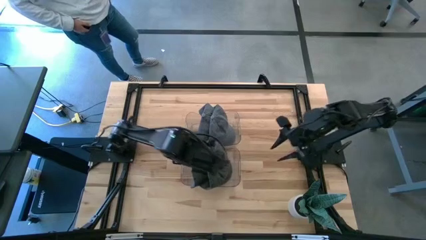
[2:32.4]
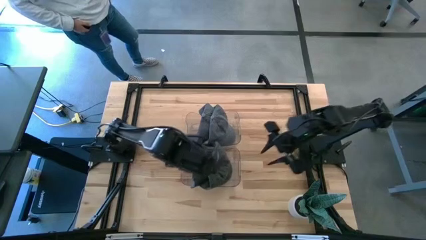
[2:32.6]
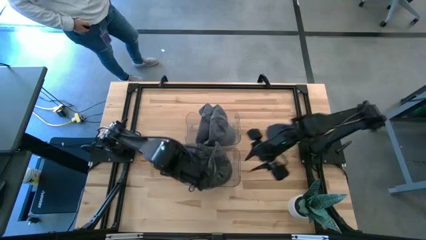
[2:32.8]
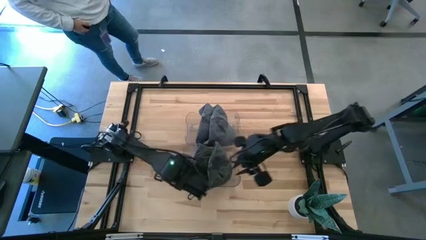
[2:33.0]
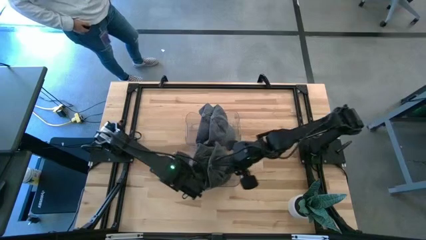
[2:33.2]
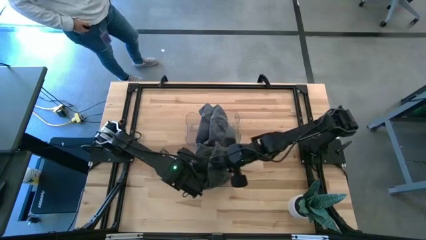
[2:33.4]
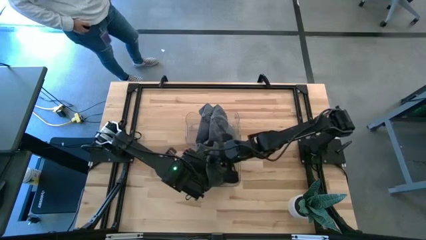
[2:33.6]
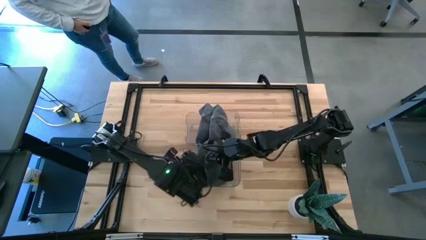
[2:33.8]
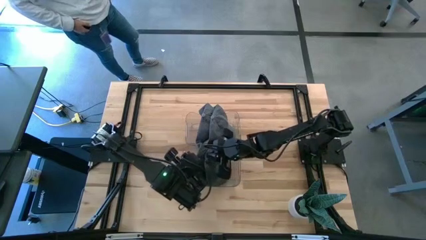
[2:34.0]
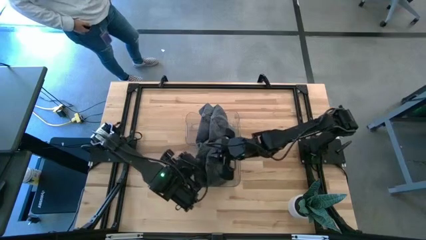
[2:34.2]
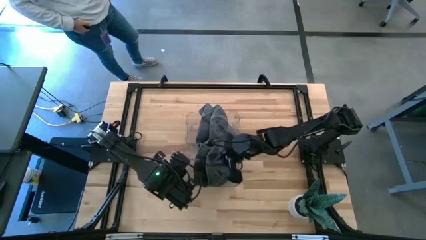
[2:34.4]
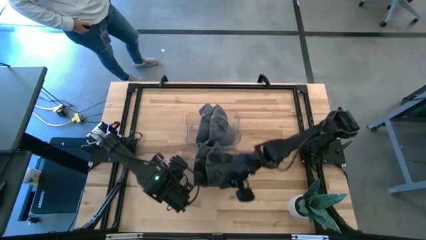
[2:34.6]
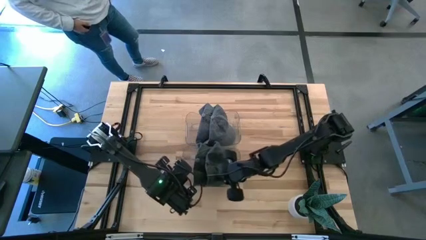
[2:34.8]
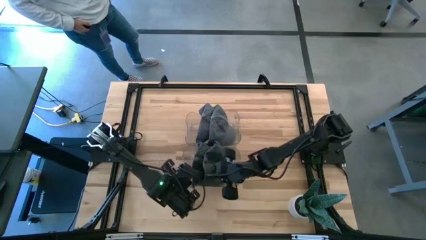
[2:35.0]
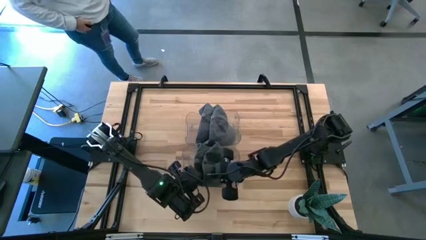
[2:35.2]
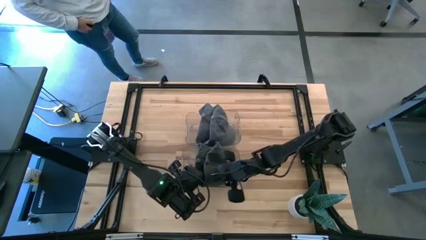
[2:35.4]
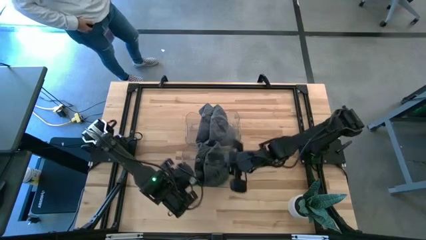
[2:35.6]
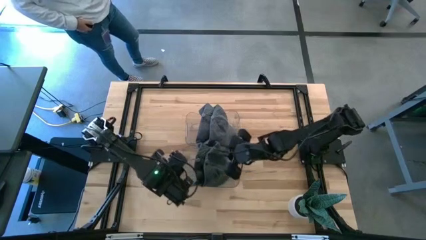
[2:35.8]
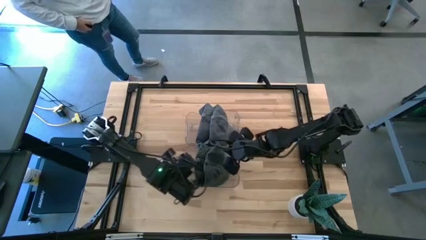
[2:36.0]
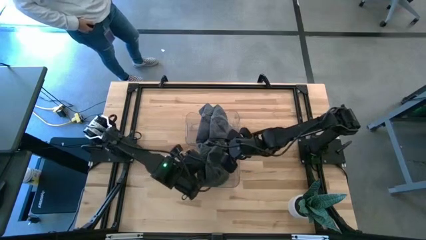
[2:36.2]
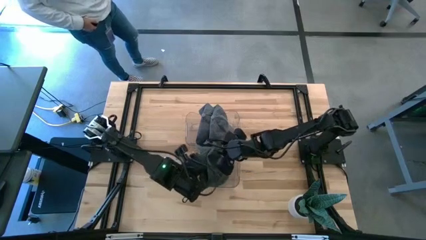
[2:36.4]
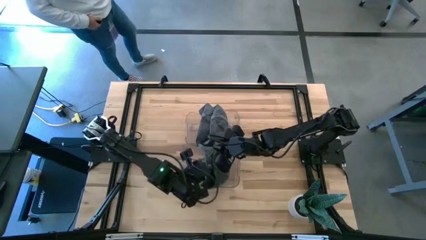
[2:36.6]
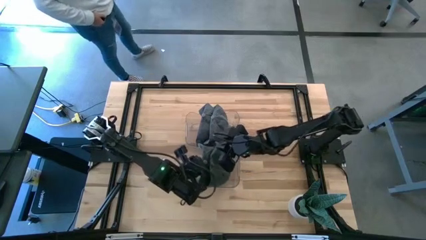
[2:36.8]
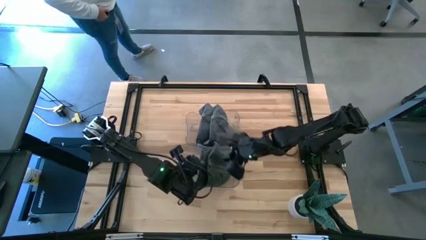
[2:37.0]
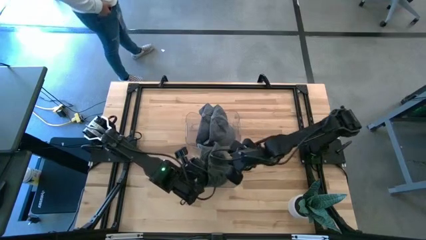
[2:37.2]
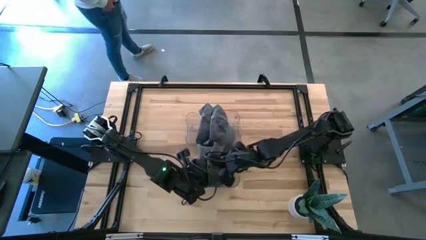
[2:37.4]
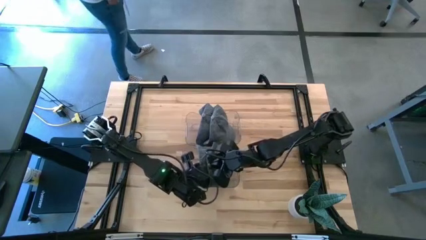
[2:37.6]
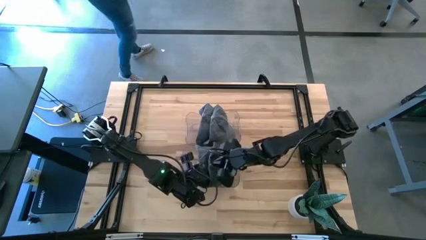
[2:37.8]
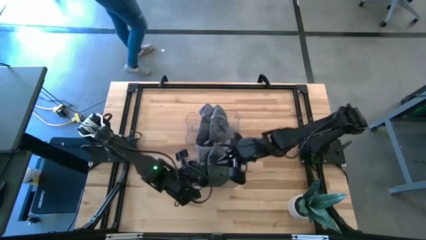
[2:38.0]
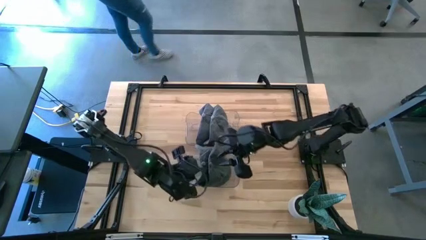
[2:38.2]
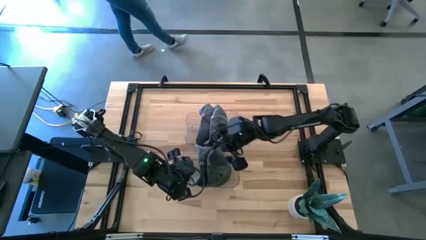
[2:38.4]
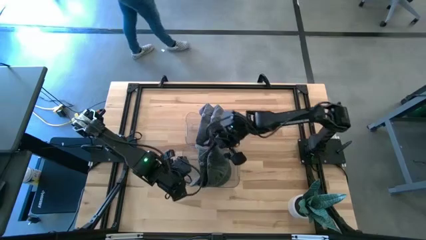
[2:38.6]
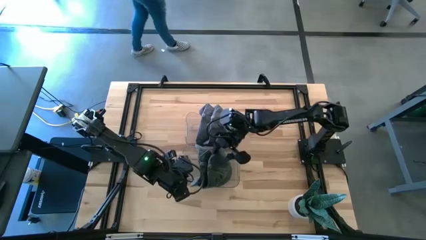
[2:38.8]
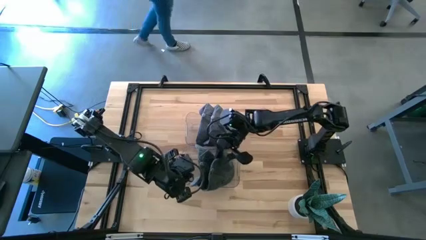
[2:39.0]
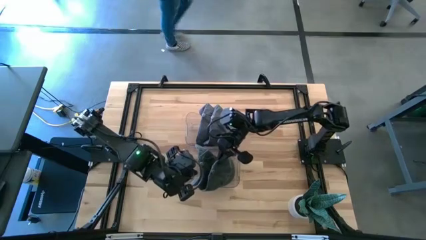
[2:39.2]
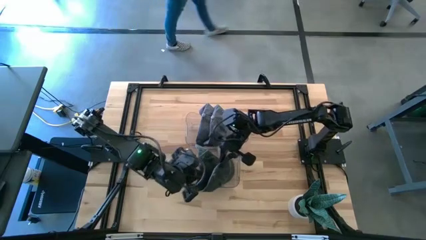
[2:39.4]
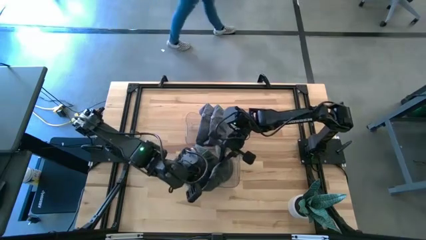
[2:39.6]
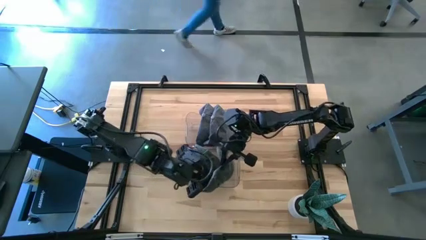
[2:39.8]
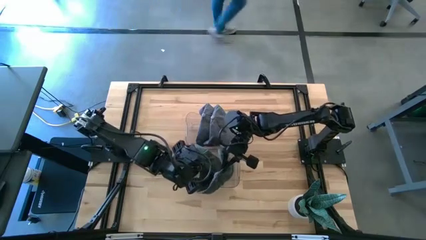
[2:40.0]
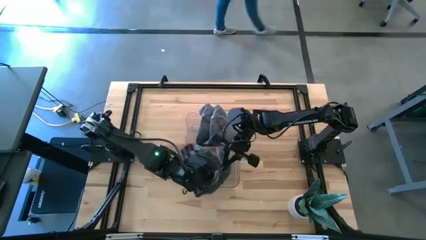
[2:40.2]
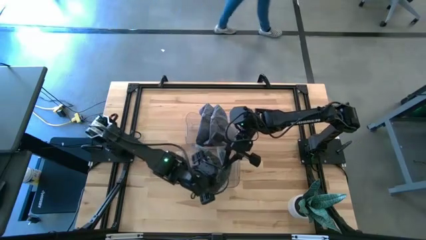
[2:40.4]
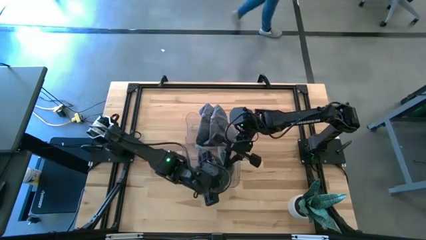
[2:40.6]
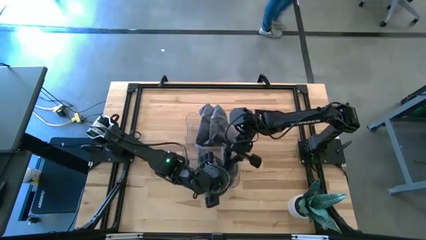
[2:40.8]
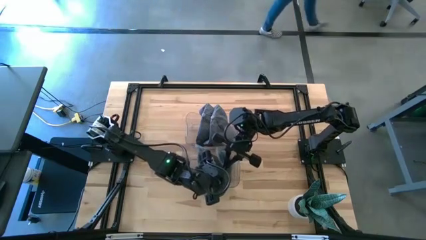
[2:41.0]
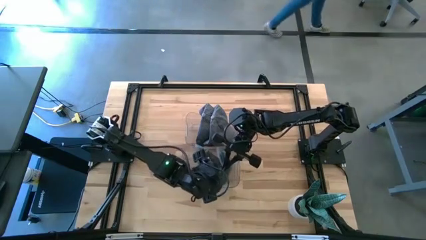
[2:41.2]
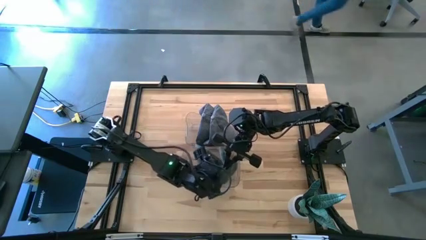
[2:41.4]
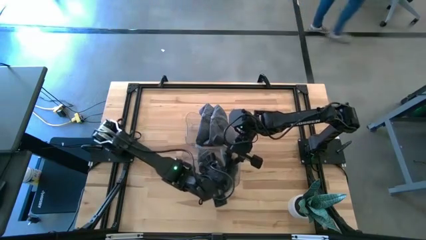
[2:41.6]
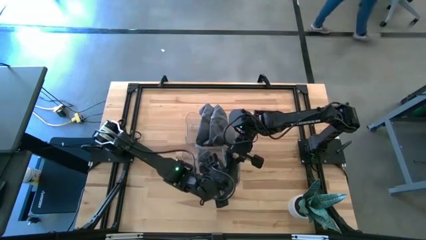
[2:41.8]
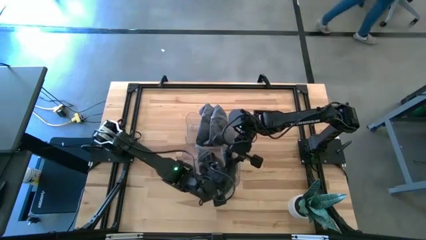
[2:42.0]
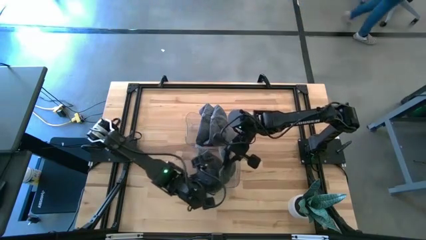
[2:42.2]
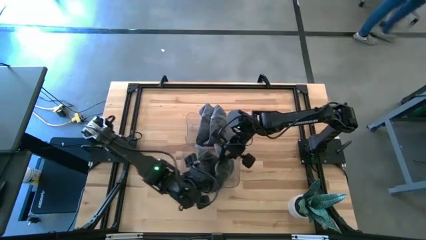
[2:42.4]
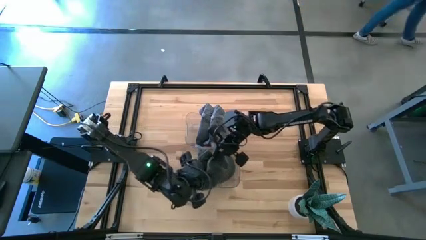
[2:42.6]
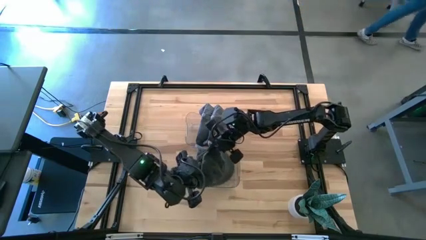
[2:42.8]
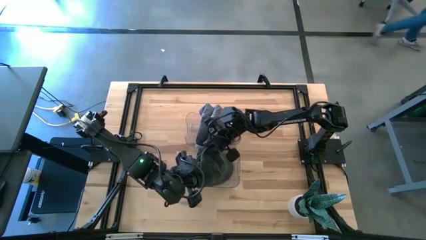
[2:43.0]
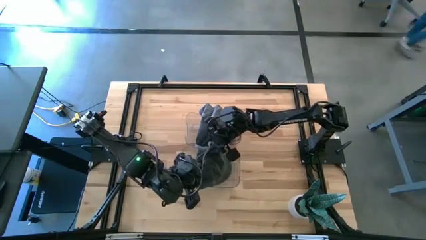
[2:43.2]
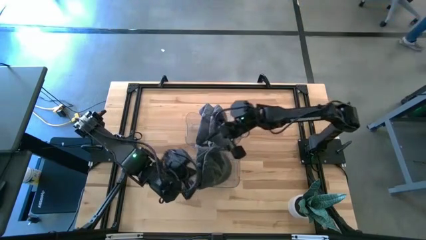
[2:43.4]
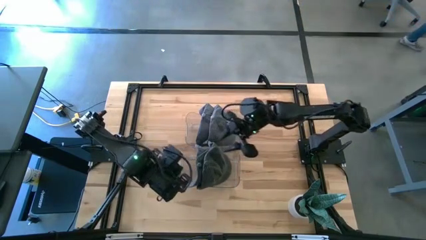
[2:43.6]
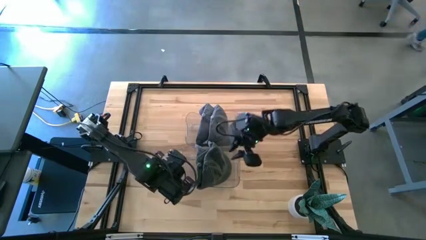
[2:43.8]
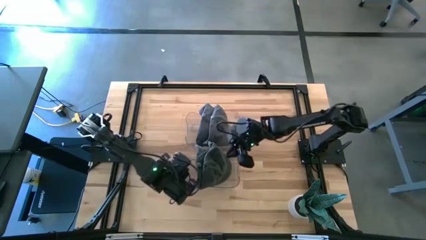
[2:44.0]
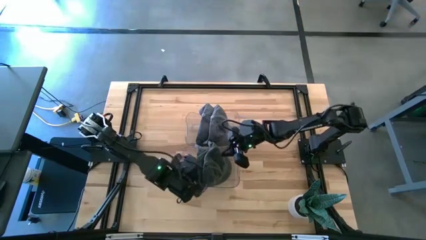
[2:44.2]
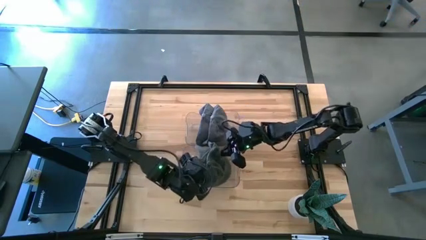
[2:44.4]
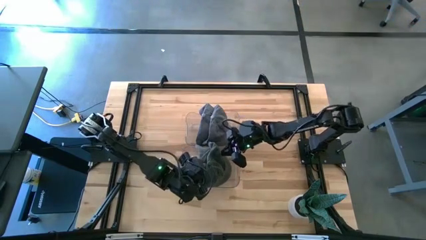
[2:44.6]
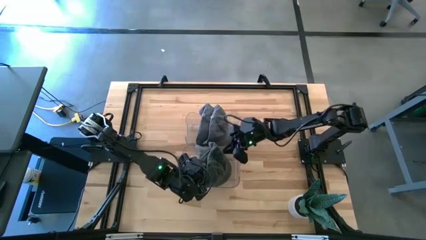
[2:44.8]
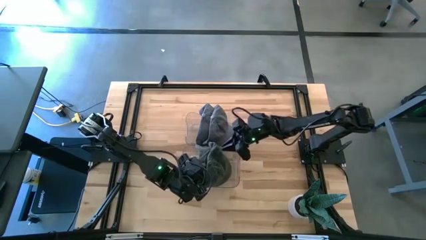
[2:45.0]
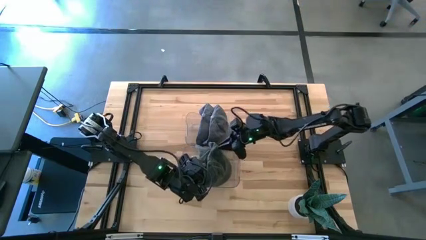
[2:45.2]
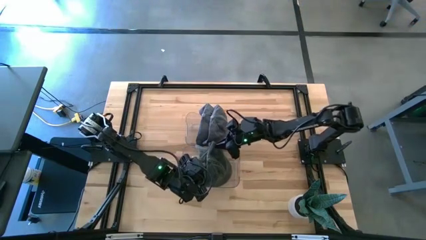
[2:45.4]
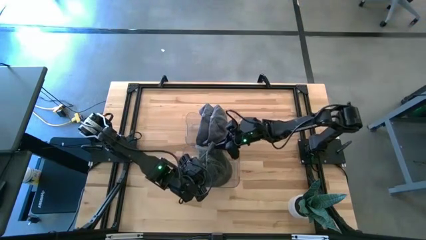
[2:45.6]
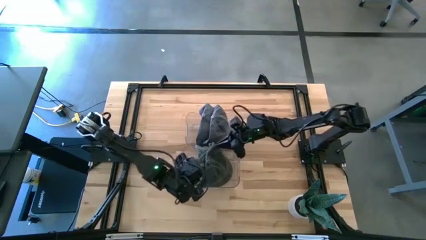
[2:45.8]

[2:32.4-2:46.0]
Task: Pick & Place hat
Adjust the black caps in the bottom transparent bin
